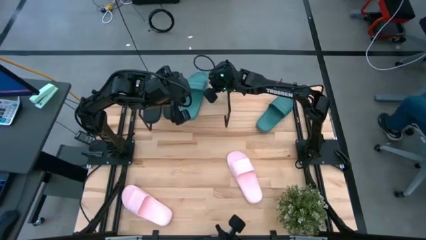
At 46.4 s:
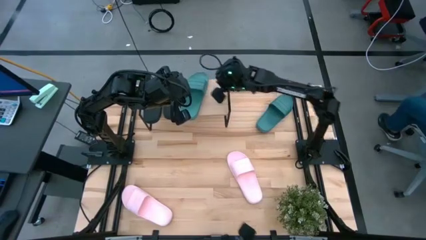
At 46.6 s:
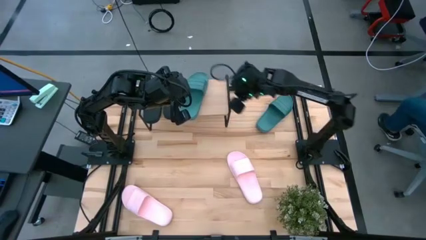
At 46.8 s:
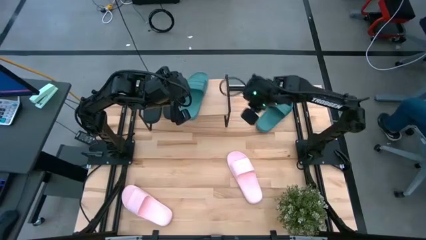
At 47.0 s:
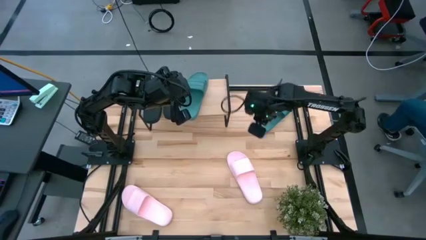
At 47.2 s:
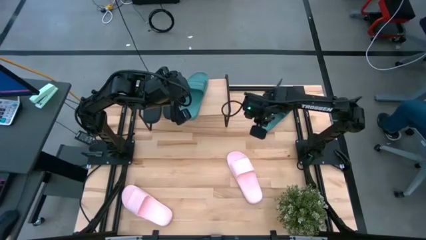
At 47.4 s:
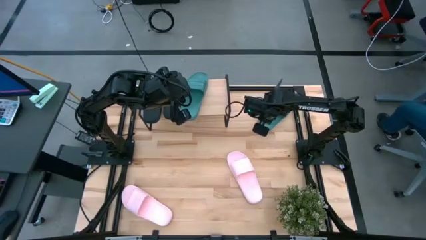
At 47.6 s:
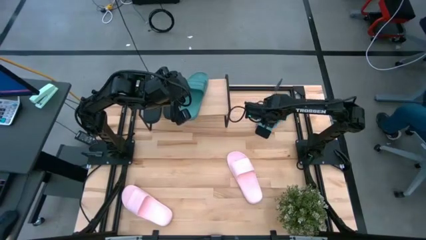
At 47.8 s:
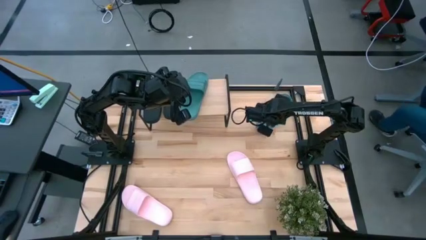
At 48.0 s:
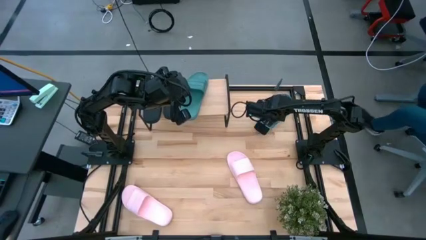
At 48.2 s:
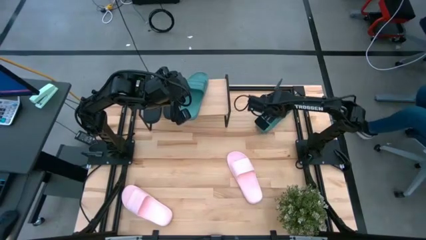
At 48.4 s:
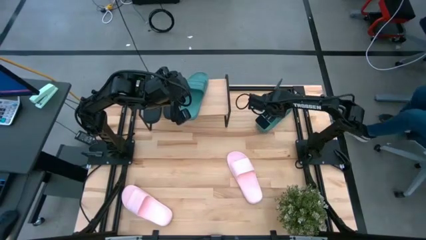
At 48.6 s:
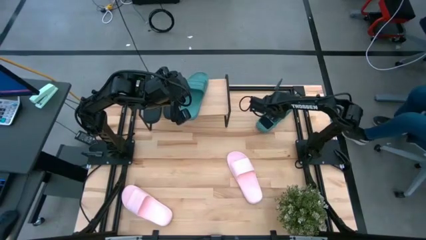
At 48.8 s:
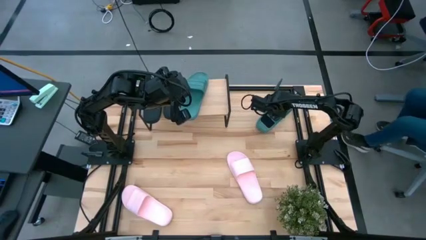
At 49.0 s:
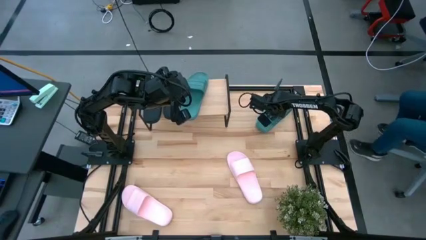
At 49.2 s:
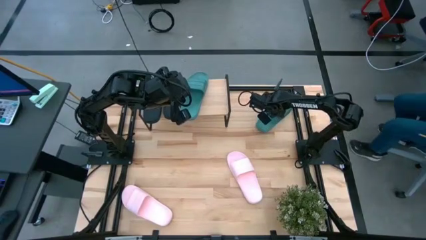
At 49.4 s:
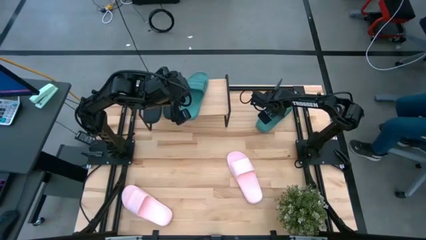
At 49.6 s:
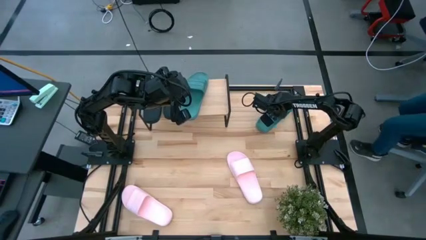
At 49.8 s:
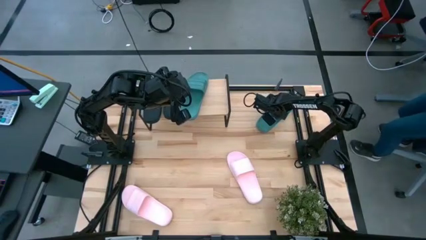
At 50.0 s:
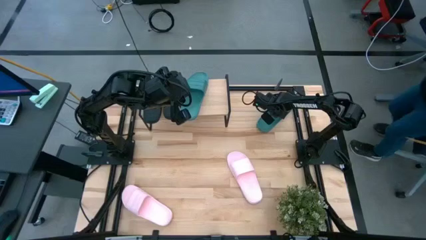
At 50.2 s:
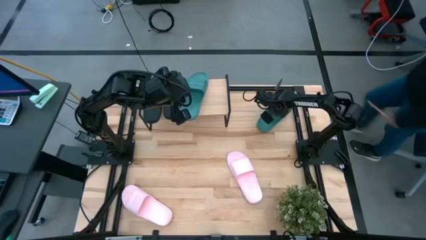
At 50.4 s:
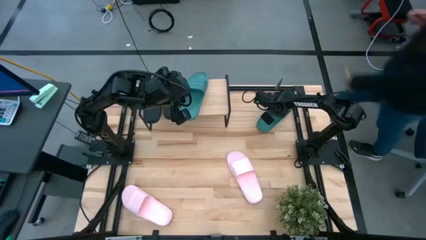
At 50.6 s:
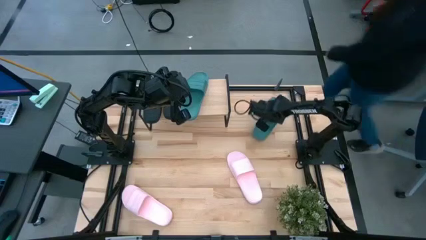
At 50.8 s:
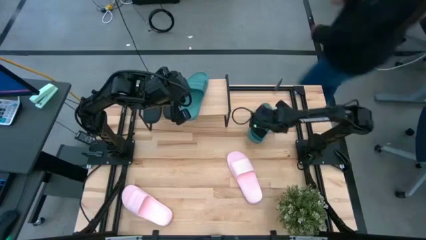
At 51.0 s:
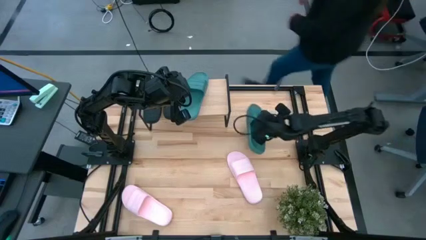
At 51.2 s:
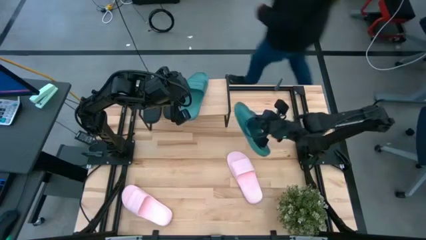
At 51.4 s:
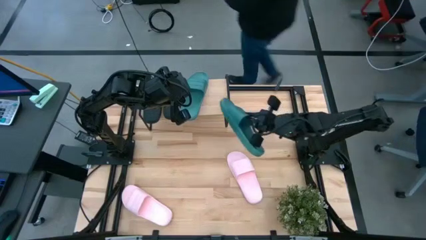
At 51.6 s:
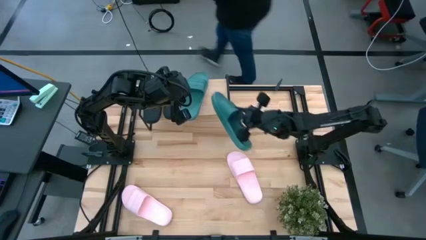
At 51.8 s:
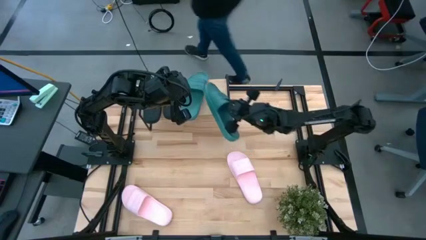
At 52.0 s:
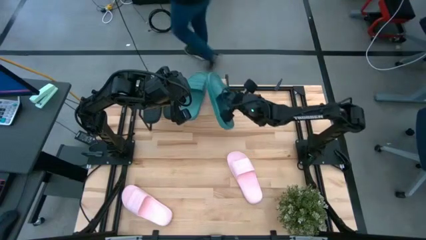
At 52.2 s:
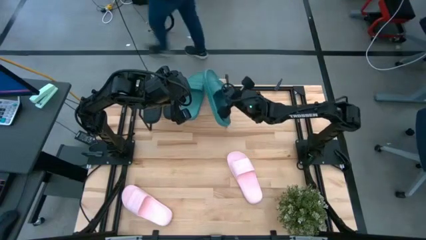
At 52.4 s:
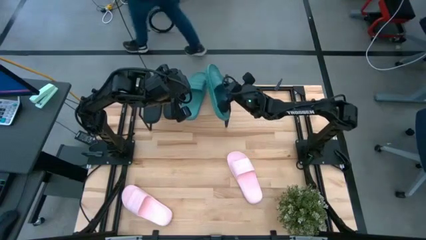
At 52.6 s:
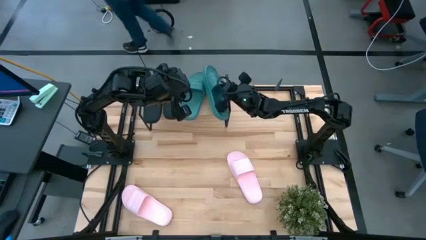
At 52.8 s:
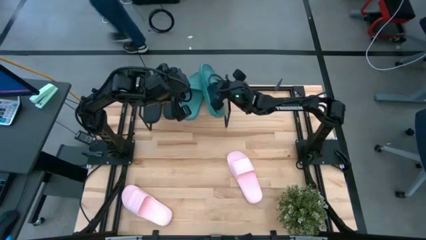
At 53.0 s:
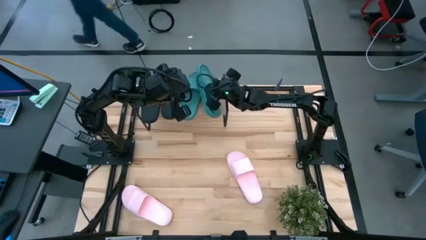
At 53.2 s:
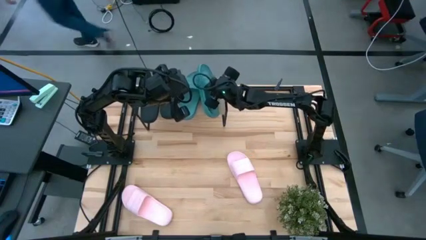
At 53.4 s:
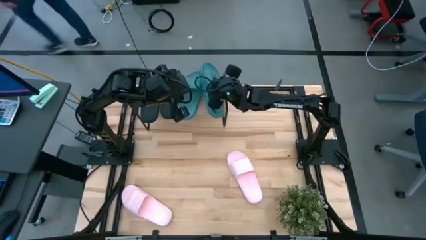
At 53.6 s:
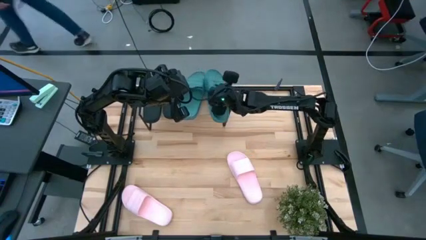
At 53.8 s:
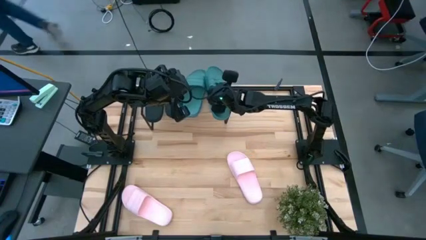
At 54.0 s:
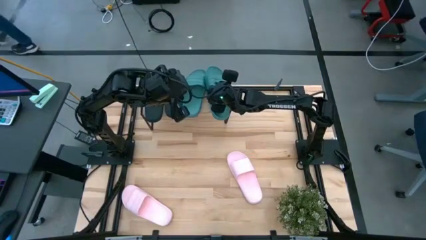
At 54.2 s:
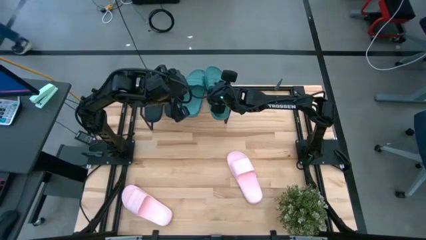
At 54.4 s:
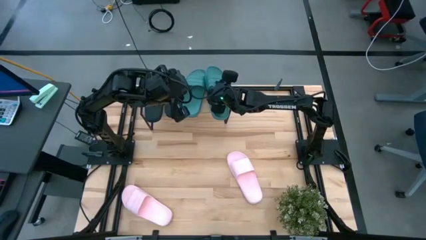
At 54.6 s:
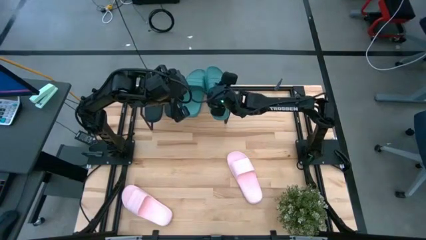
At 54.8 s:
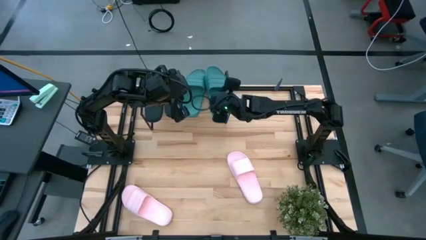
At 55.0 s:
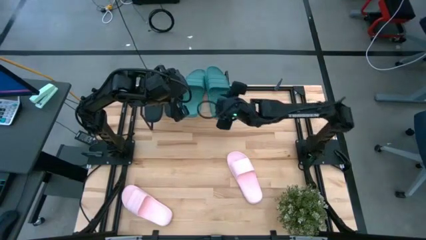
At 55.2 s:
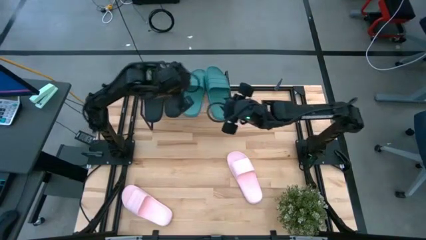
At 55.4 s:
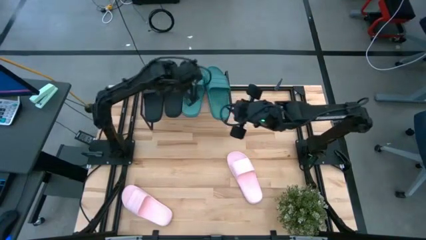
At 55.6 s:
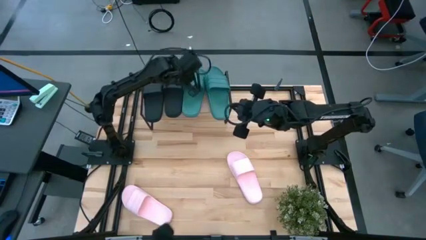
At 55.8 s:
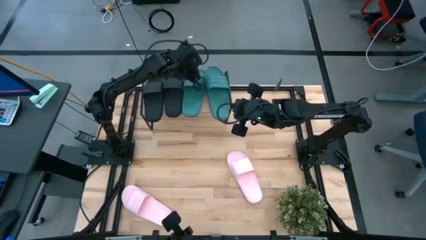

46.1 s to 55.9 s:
Task: Pick and place slides into the shelf
Put the green slipper on the shelf

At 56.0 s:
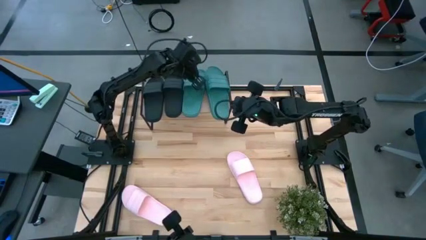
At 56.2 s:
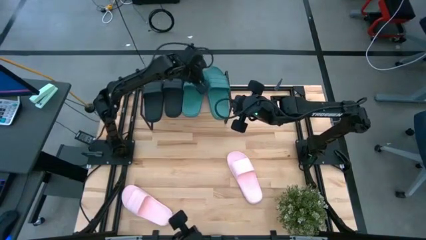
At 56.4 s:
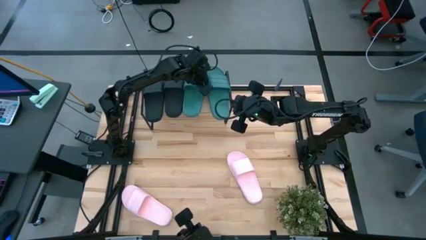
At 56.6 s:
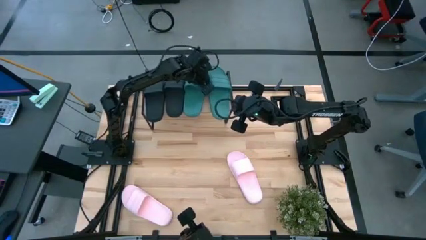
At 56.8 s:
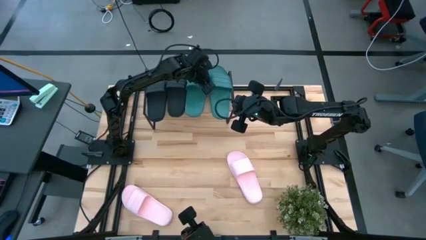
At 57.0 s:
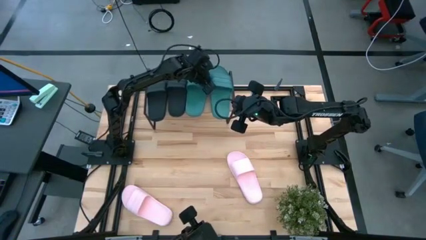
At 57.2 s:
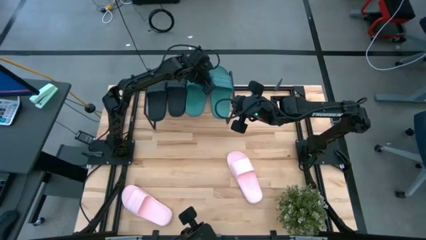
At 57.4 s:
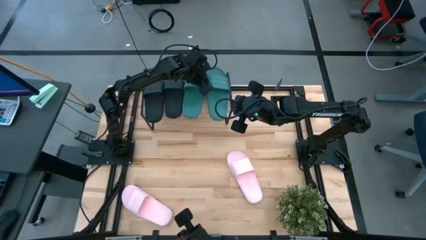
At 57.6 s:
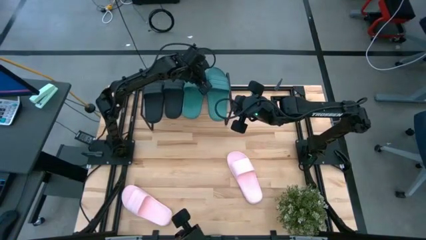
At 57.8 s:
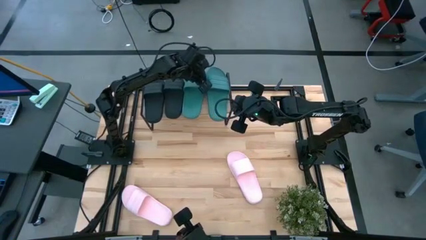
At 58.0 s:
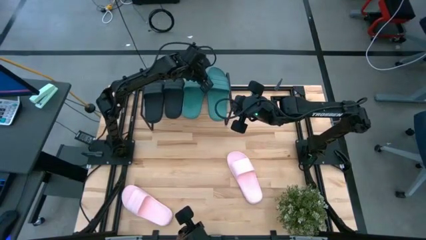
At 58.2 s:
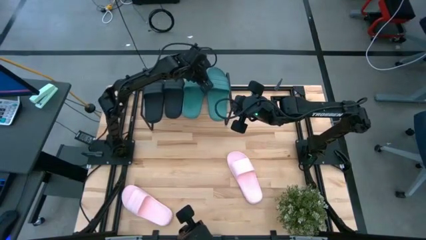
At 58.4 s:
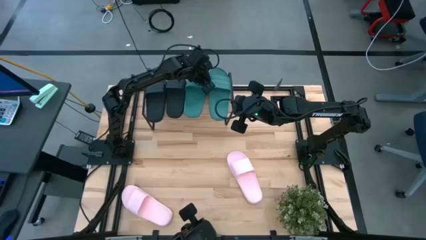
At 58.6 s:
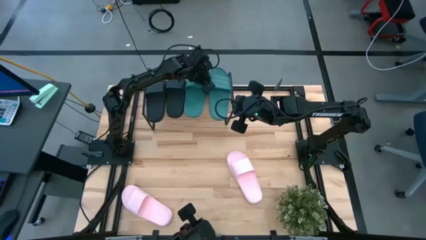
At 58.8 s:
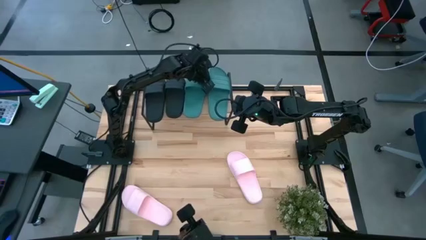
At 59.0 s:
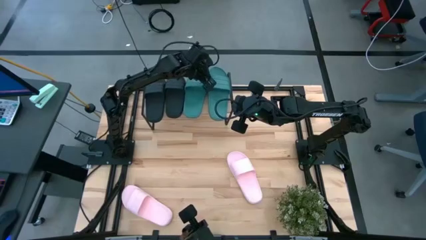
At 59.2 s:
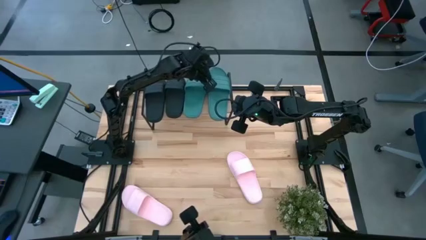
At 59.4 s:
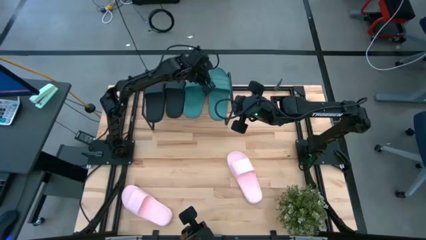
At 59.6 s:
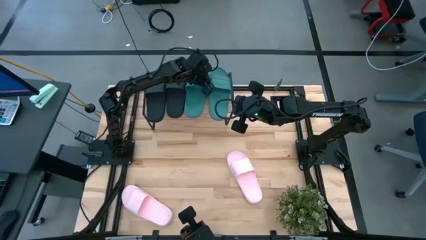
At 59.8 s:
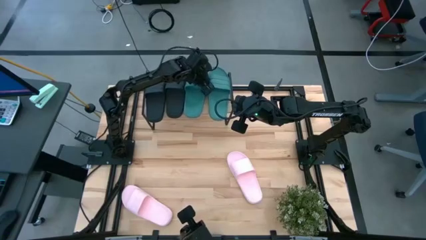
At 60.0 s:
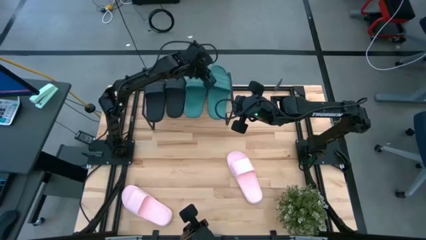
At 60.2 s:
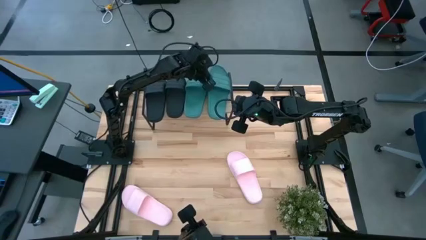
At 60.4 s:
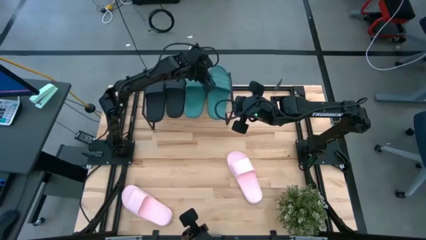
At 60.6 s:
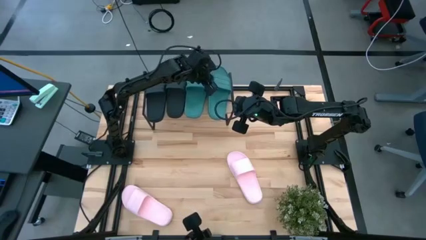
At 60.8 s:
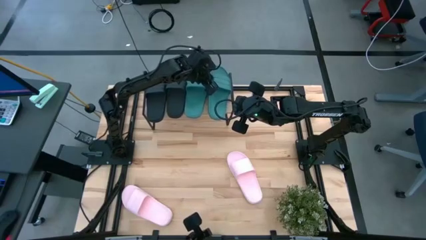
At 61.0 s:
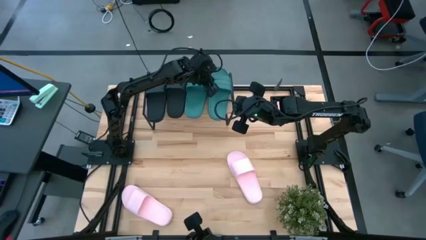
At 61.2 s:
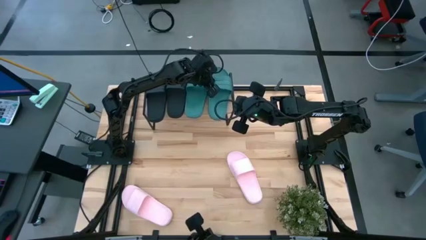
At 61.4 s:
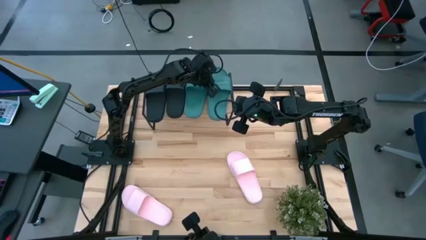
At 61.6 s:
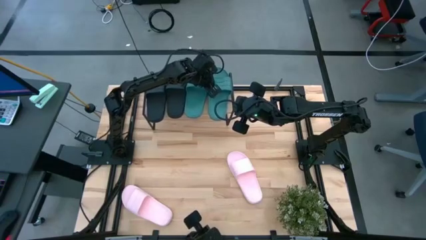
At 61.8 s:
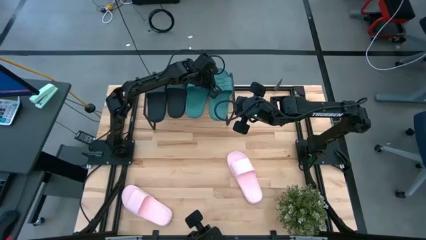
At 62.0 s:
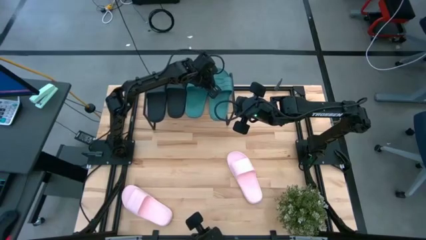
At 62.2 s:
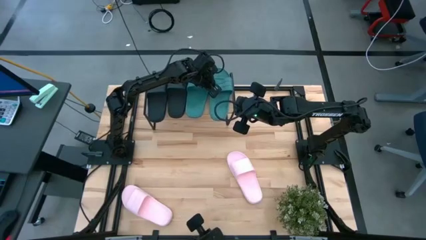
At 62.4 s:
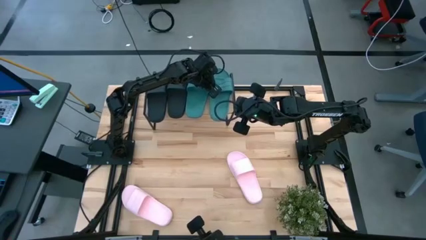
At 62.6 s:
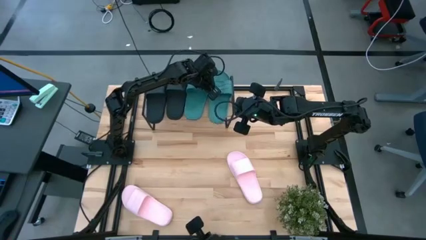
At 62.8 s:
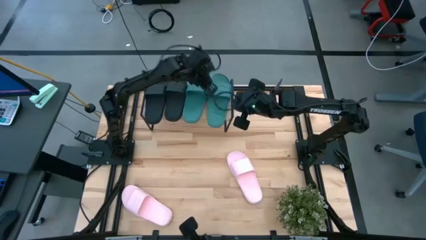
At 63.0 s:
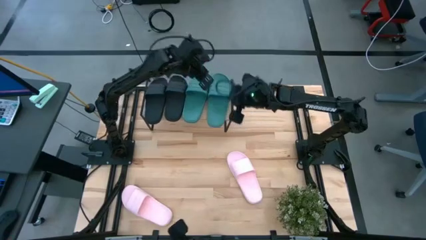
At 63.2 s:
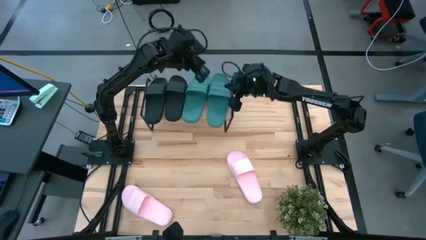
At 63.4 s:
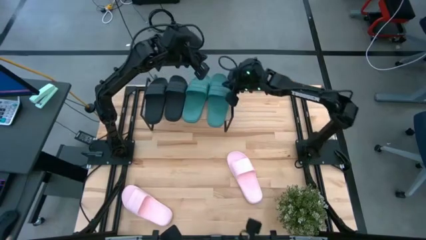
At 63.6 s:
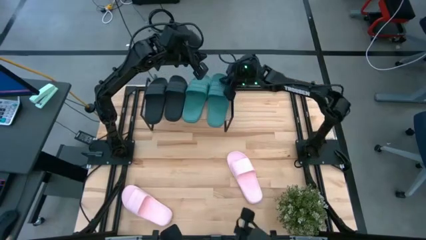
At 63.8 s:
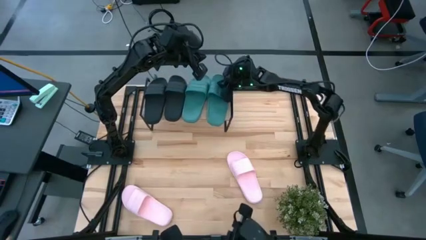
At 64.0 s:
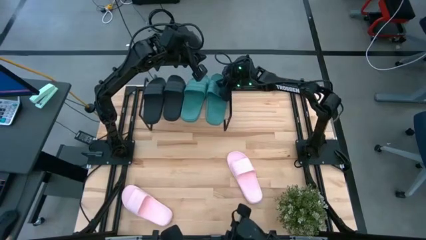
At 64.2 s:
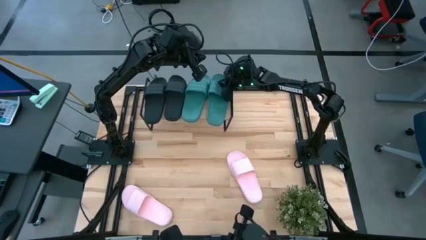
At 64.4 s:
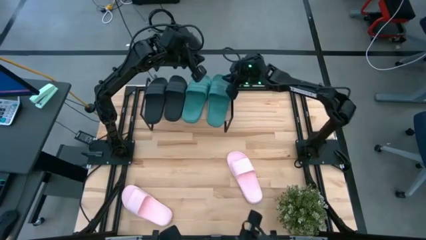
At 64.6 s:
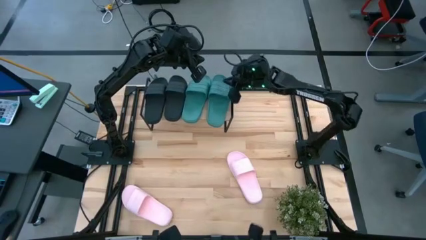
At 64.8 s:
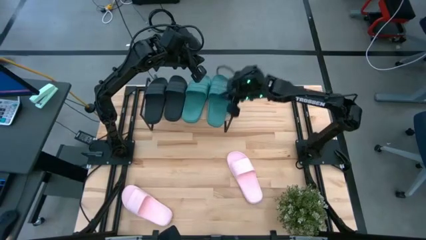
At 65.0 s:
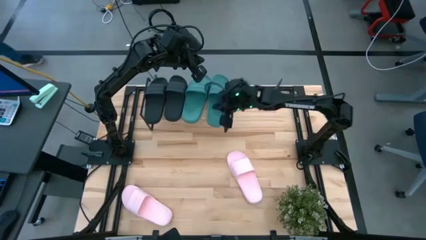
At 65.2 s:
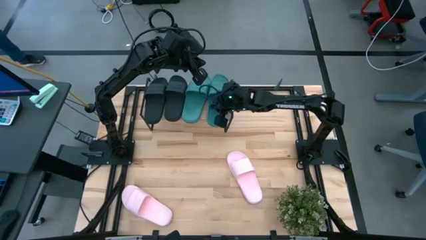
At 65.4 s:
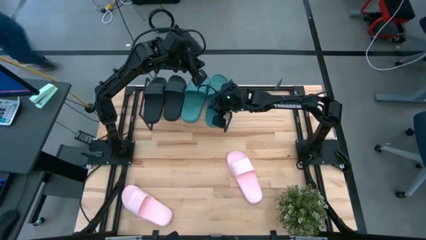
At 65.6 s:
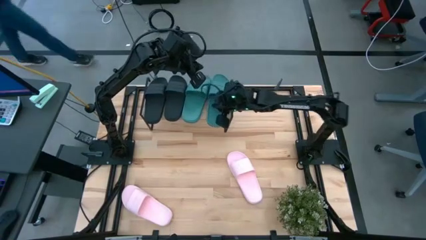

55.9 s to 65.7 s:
Put the green slipper on the shelf
